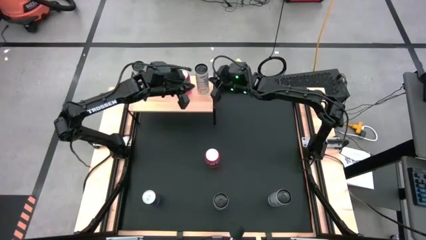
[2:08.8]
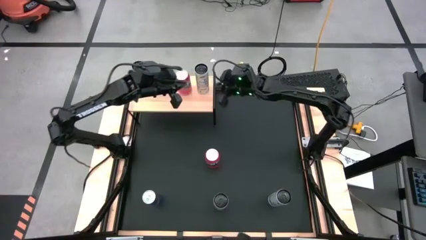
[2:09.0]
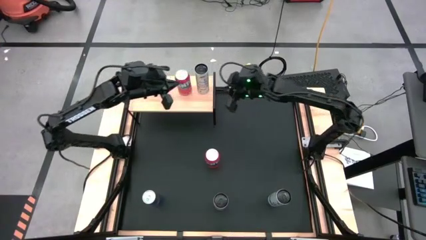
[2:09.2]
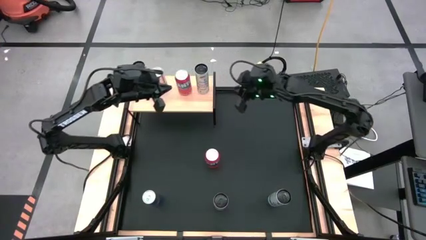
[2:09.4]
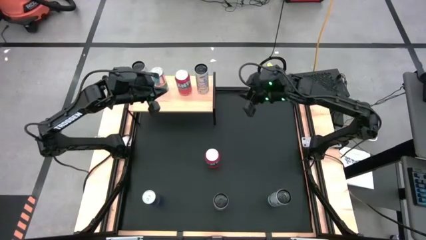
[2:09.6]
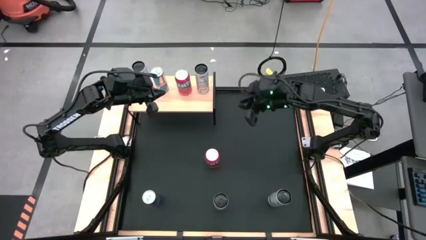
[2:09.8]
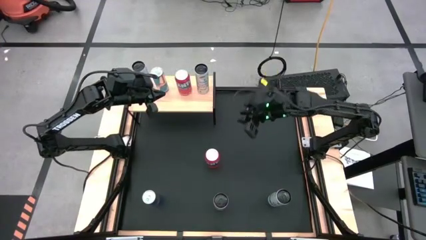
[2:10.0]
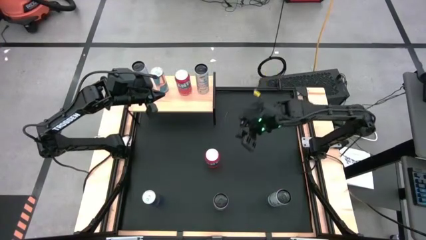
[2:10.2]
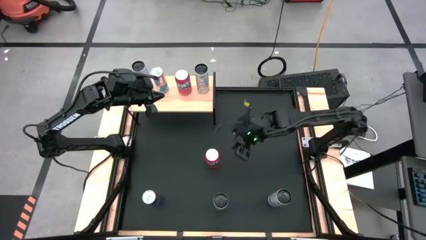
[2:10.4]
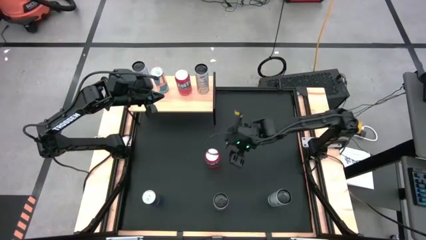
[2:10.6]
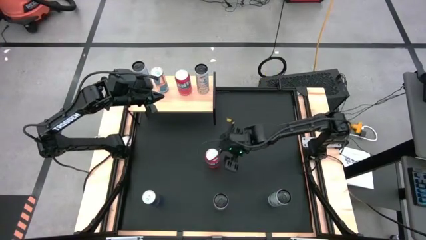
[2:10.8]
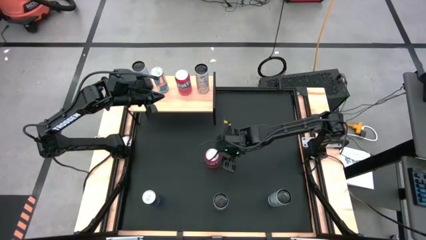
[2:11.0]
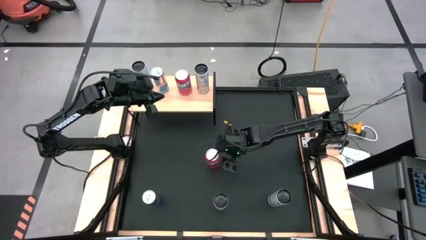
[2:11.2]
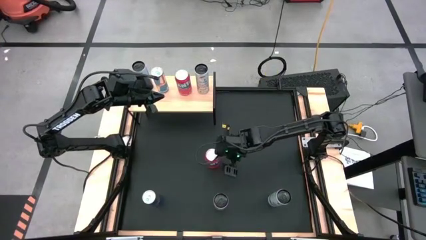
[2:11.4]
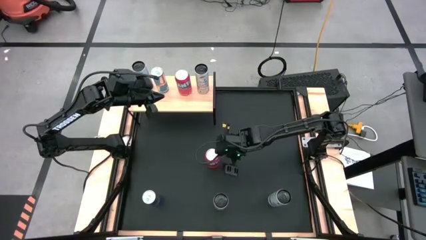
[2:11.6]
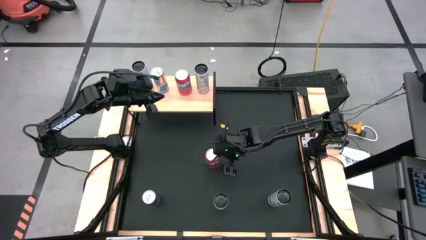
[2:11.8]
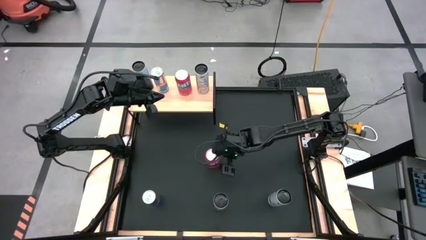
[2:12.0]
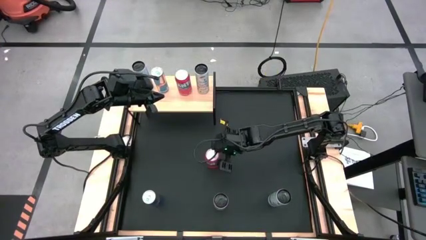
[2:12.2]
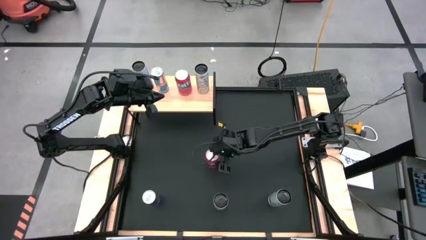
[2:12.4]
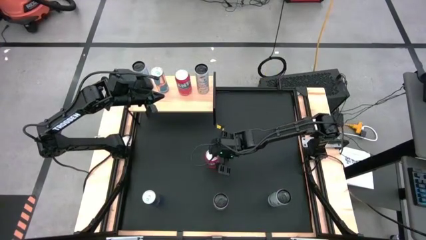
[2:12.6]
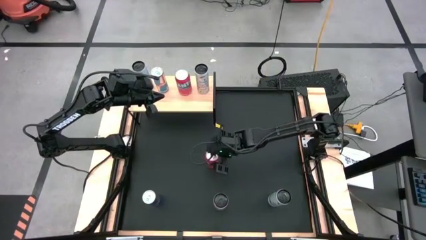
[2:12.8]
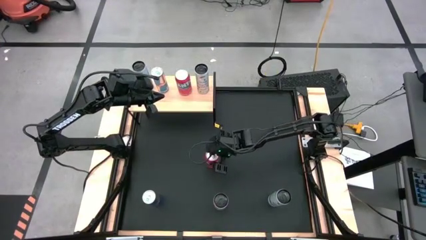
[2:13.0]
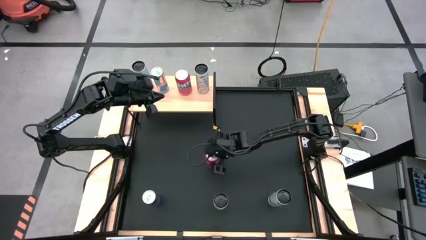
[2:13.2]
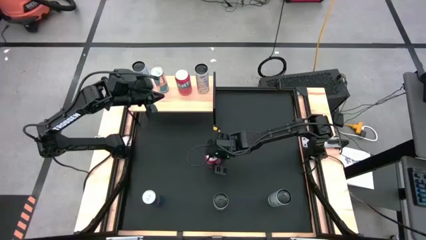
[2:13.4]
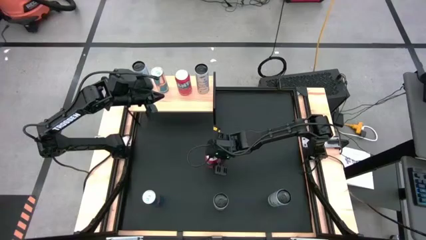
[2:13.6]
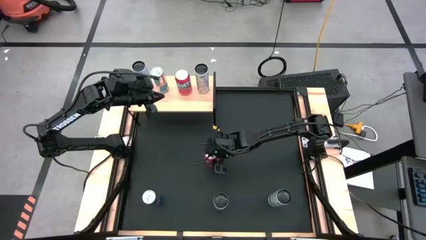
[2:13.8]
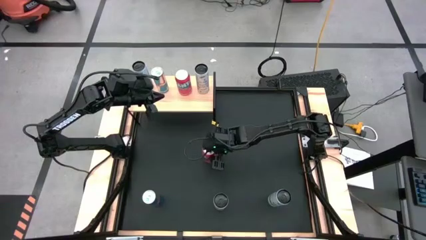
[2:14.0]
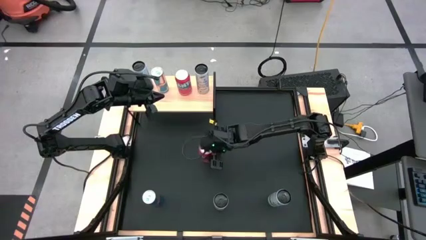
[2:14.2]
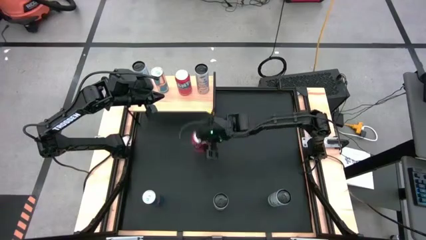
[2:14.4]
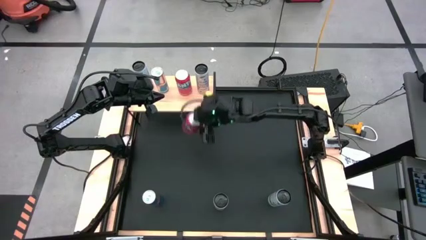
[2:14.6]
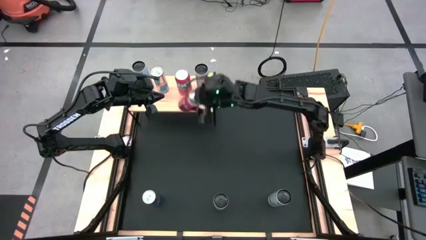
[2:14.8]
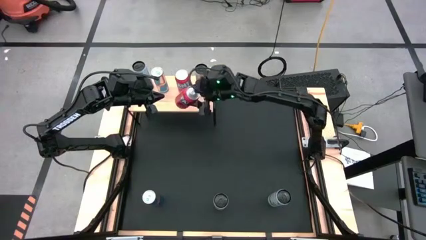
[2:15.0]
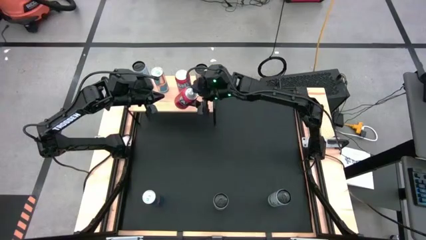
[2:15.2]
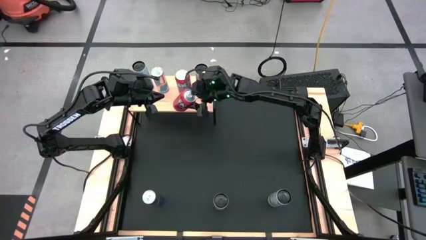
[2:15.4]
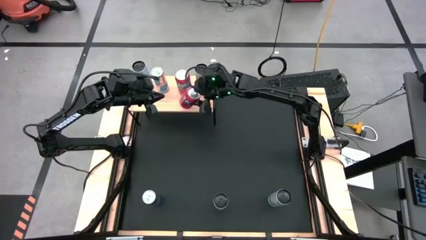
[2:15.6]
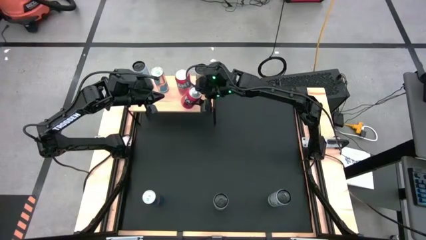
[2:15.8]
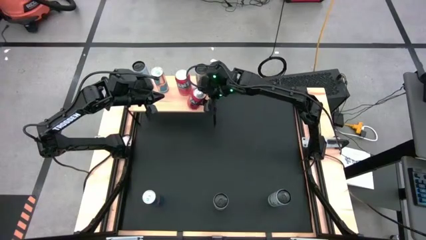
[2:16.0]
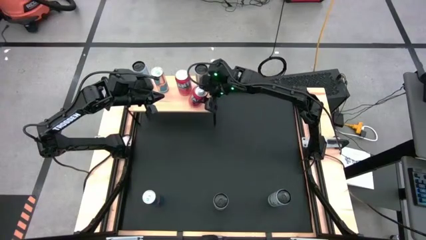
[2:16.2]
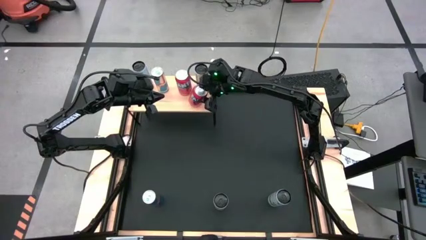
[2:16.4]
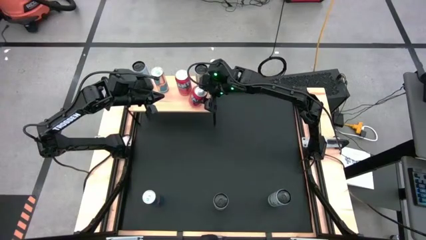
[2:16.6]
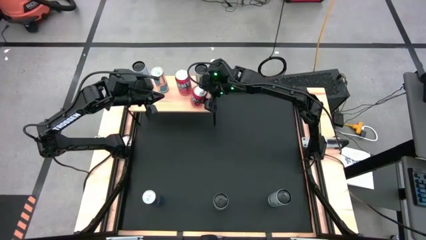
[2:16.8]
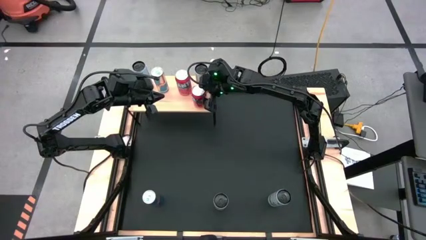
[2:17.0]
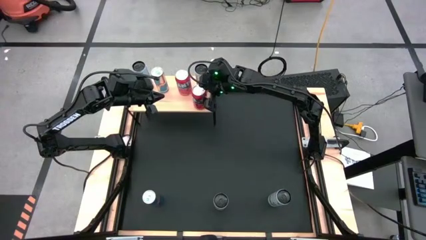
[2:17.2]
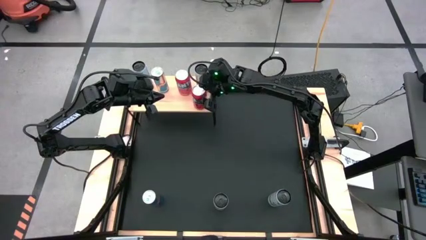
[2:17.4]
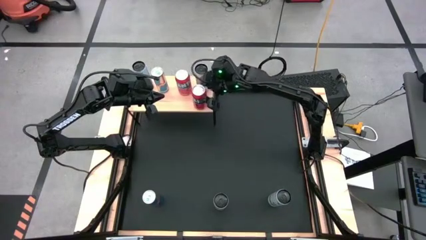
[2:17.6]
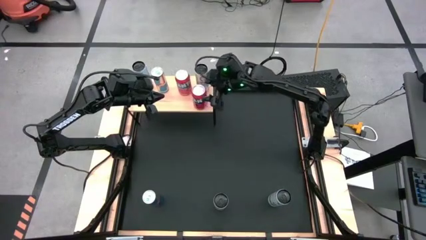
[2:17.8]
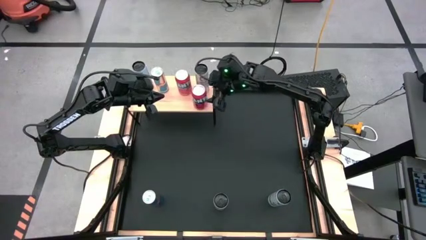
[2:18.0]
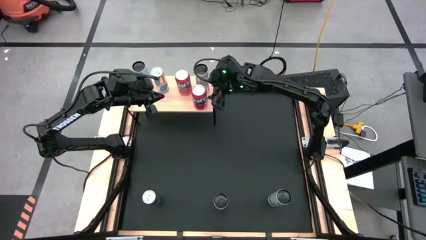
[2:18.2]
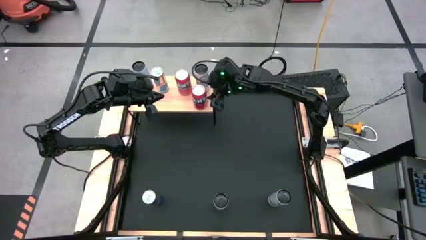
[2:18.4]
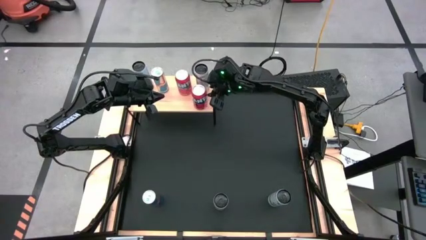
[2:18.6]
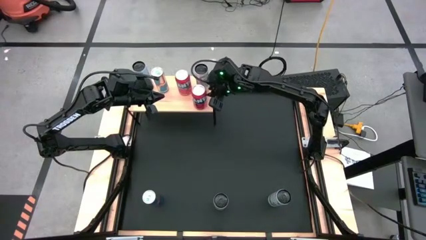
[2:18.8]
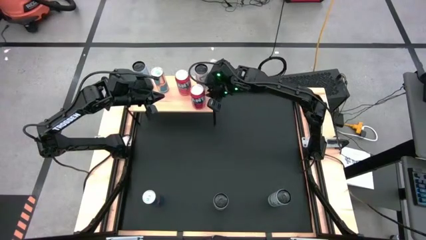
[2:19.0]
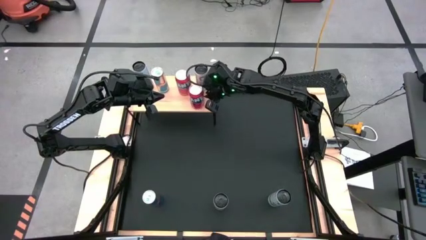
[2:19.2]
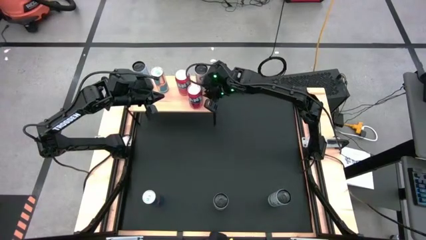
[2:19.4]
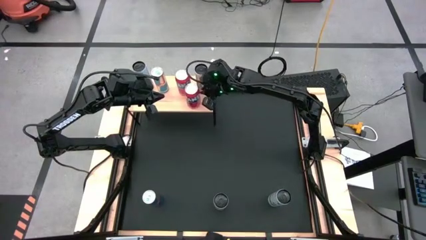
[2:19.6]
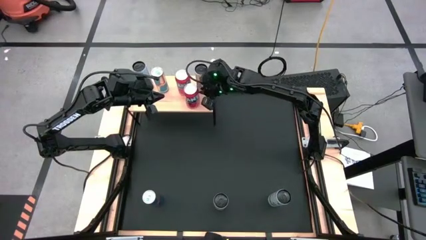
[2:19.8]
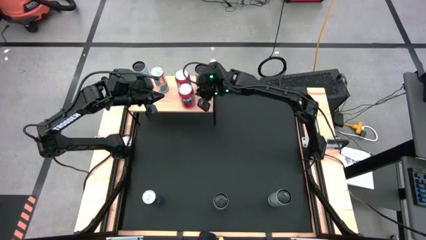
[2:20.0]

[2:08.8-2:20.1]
Task: Place canned beverage on shelf
Put the red soda can aligned with the other red soda can on the shelf
